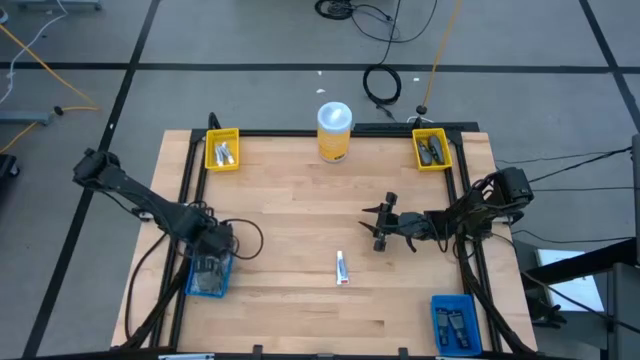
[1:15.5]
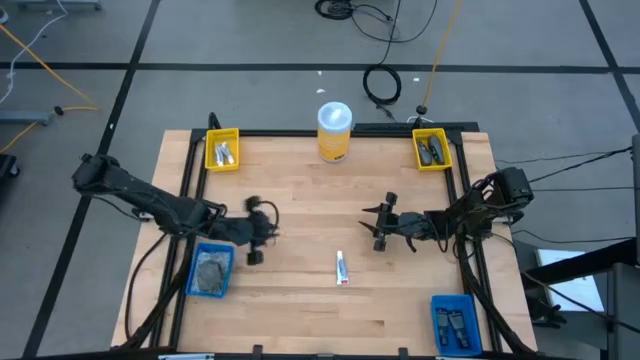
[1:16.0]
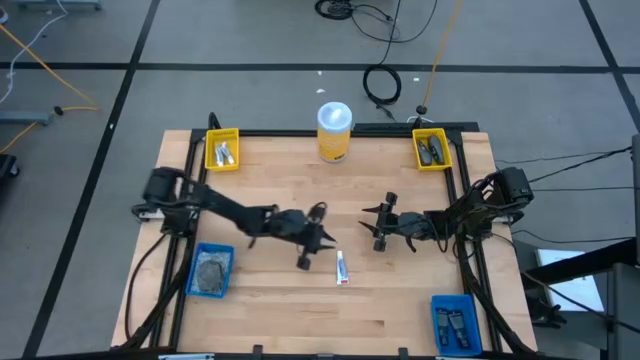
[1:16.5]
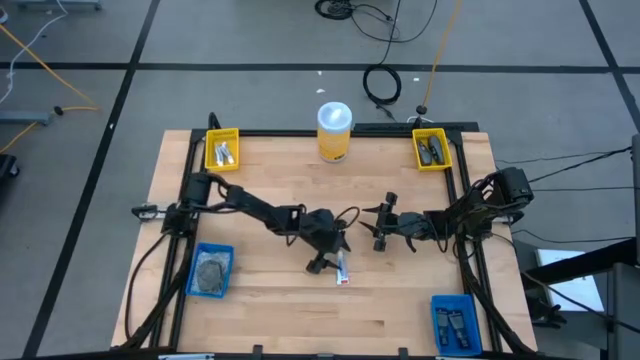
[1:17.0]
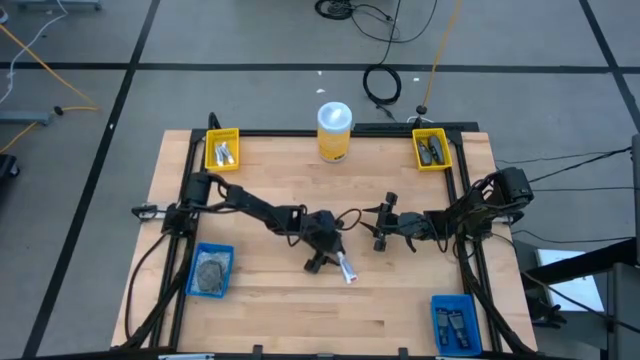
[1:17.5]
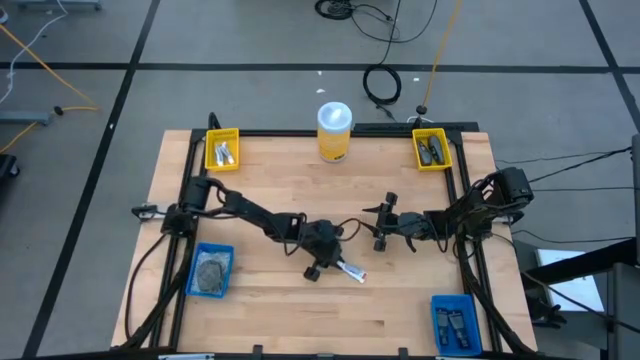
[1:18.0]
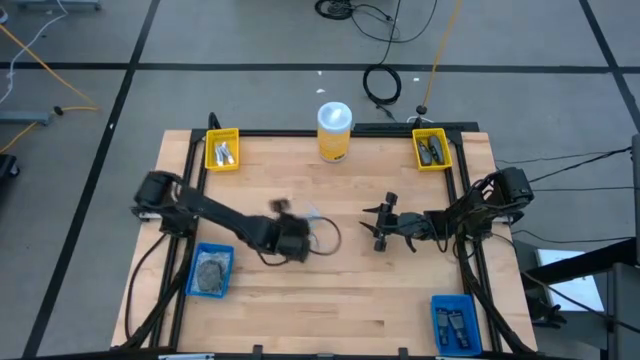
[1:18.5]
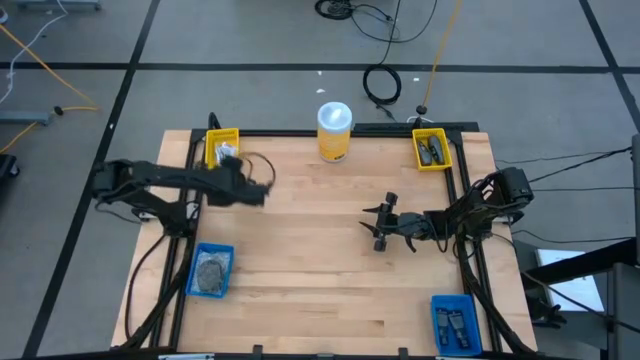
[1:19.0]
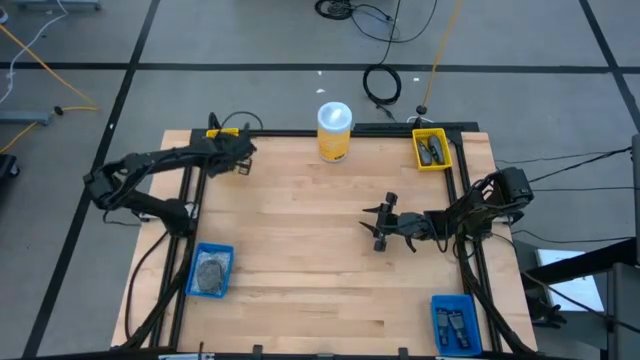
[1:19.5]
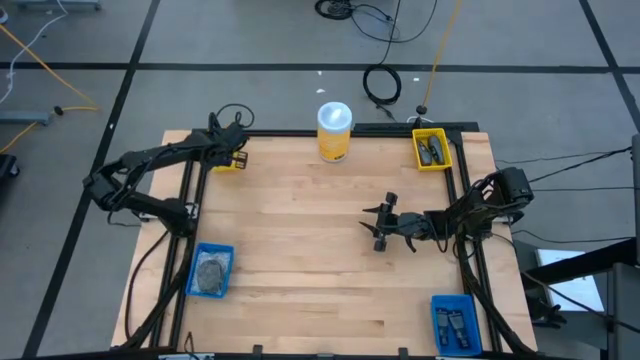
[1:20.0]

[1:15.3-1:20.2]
Task: Pick & Place Travel size toiletries
Put the white toothpaste into the left yellow bin

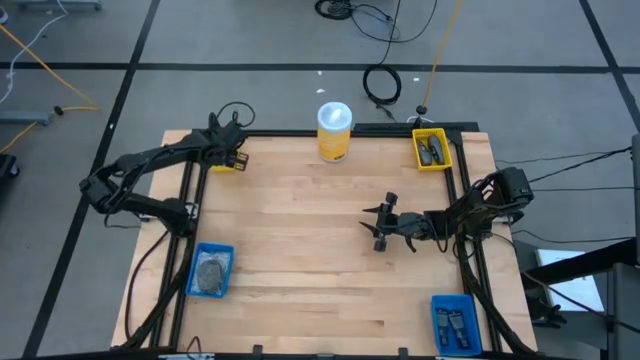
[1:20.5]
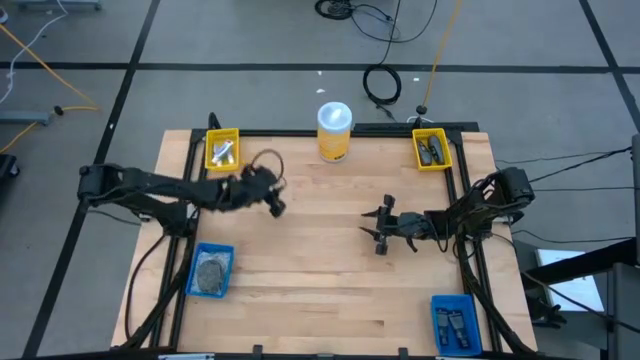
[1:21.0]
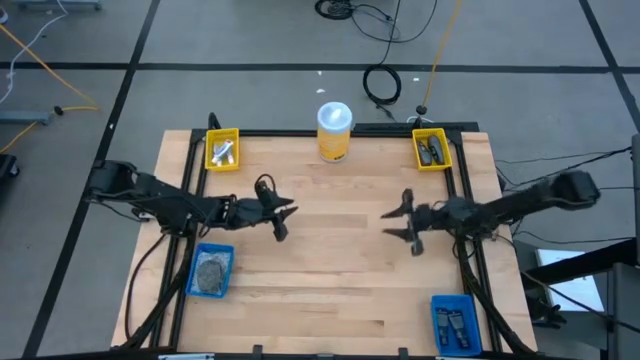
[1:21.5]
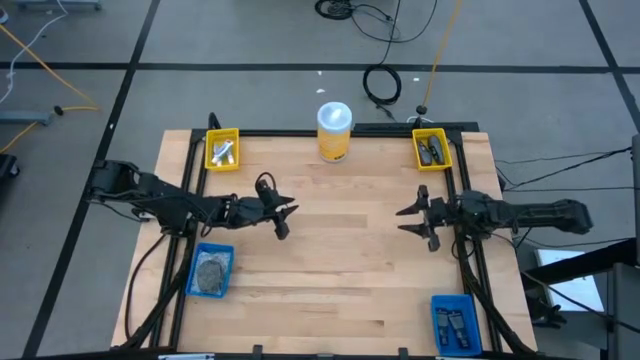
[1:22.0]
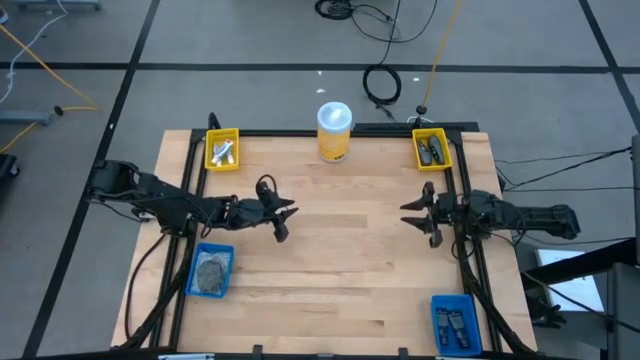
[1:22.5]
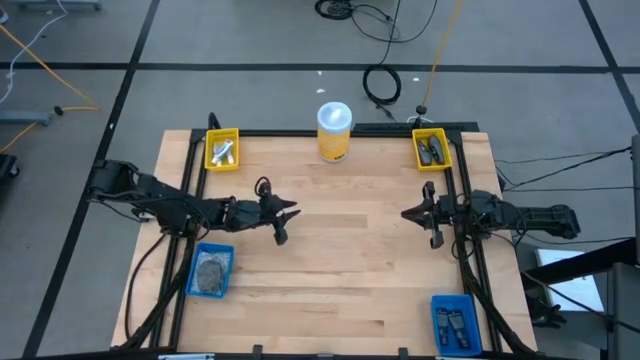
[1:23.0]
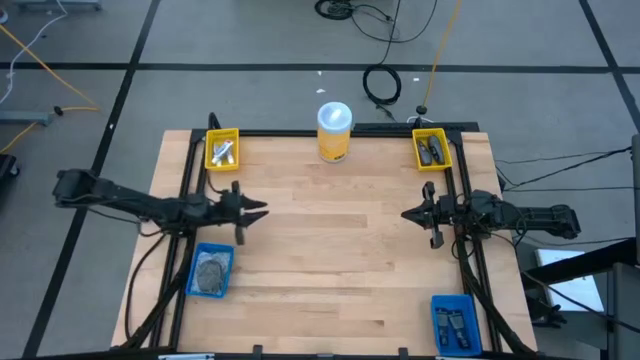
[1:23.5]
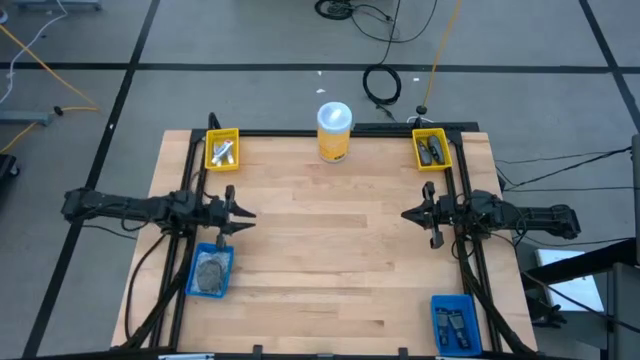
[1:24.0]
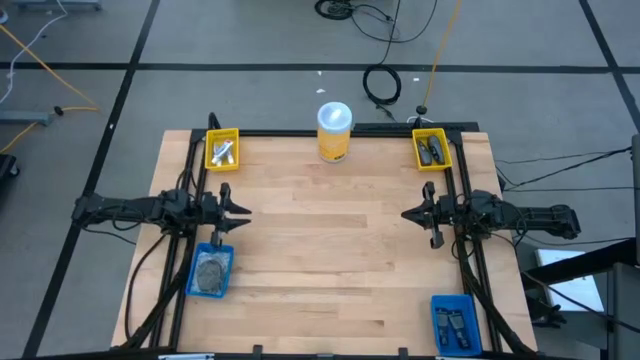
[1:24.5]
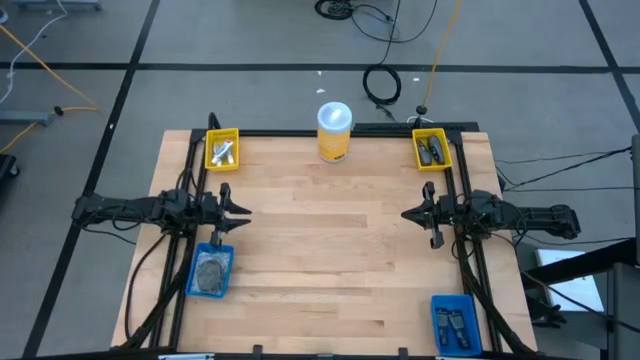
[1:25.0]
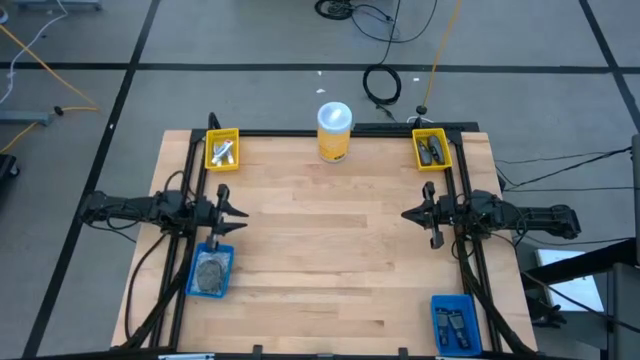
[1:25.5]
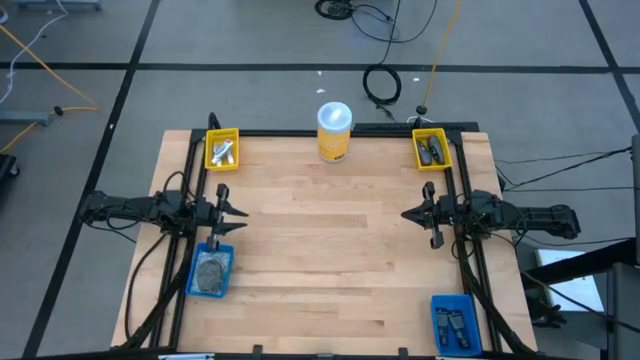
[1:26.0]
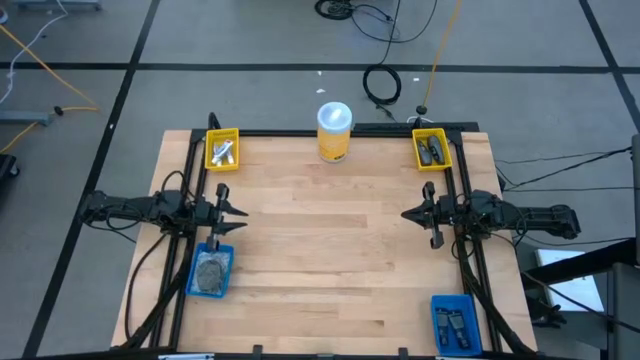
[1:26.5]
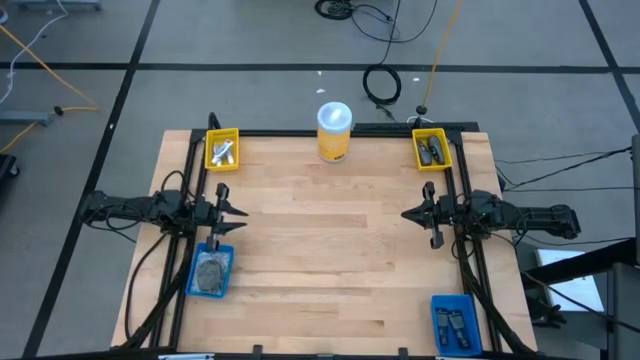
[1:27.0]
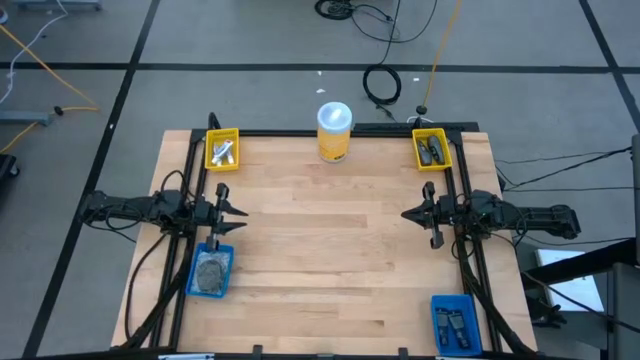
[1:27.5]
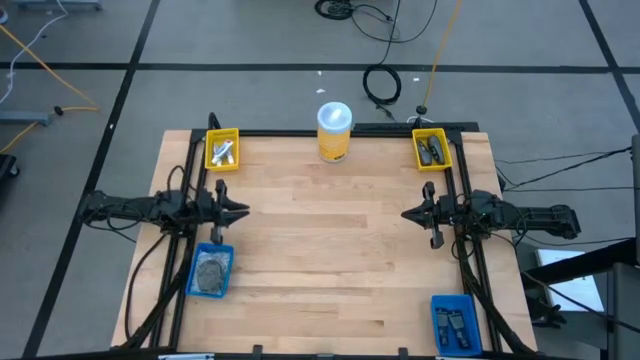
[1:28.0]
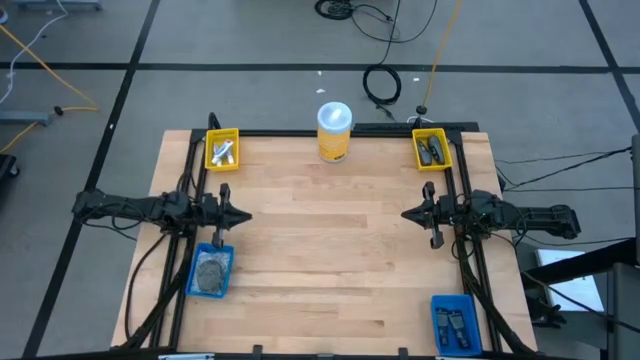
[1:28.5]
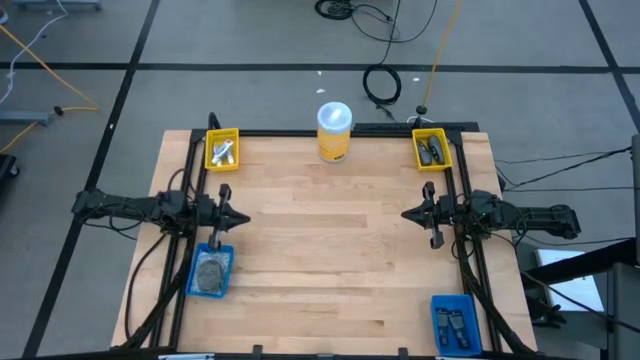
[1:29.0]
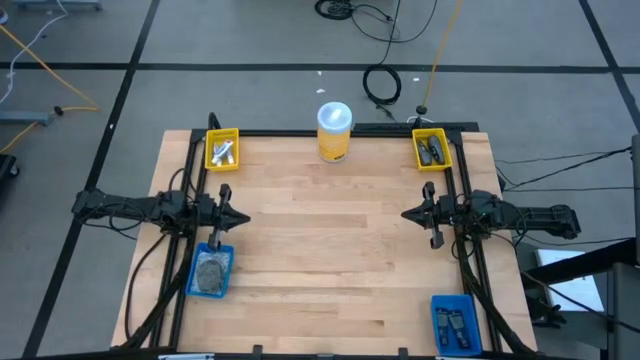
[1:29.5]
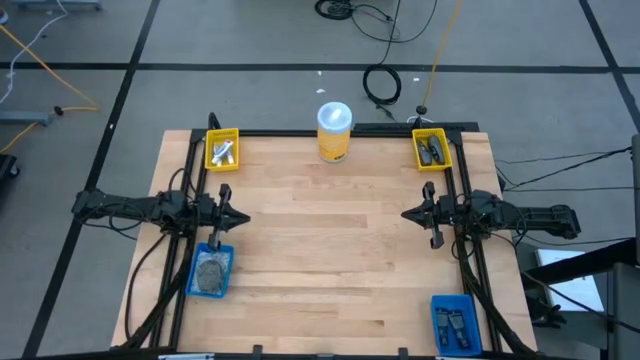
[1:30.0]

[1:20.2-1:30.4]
Return to Home Position

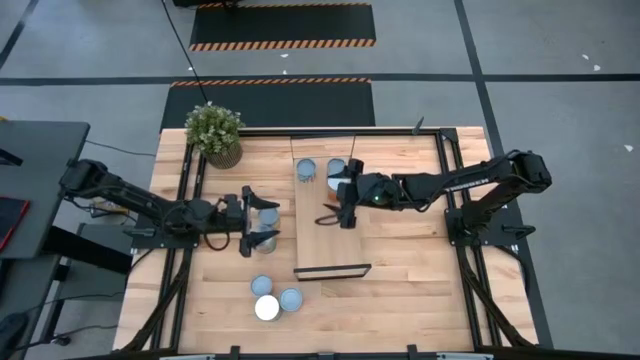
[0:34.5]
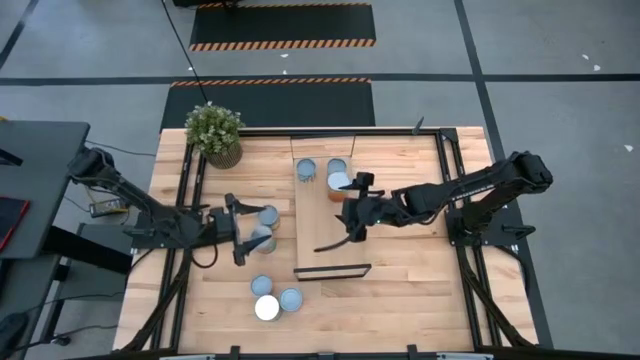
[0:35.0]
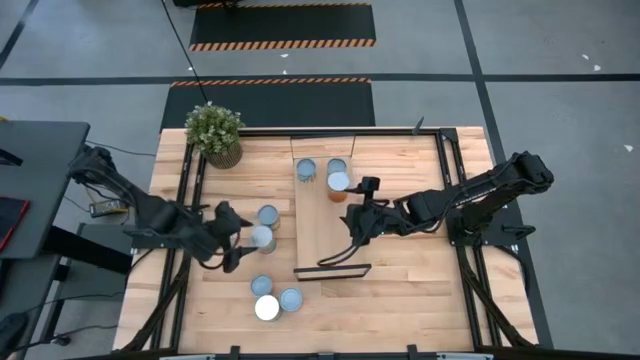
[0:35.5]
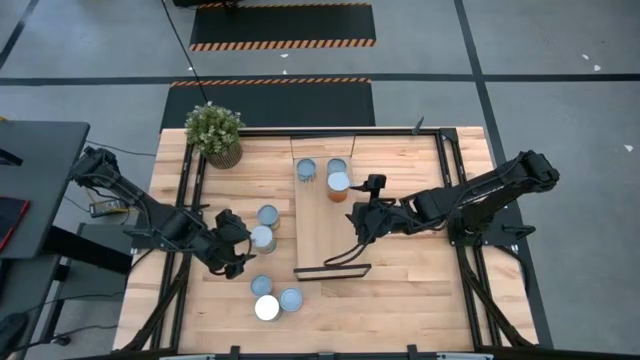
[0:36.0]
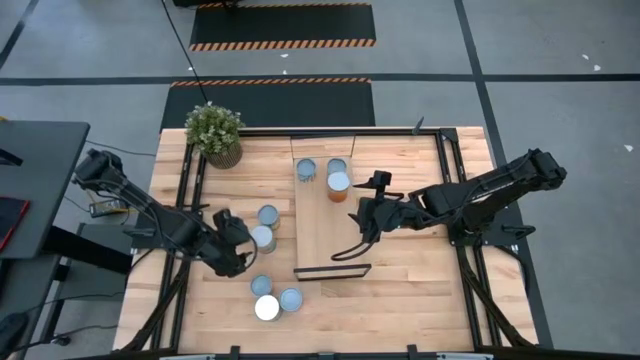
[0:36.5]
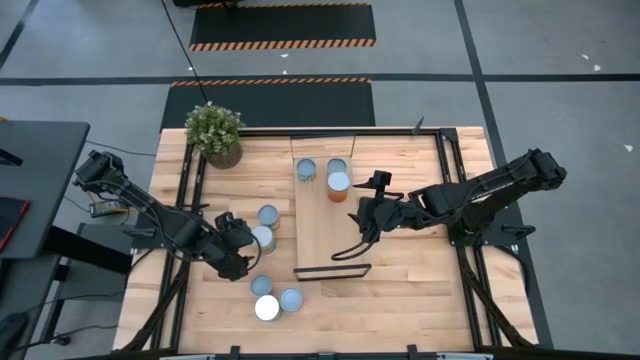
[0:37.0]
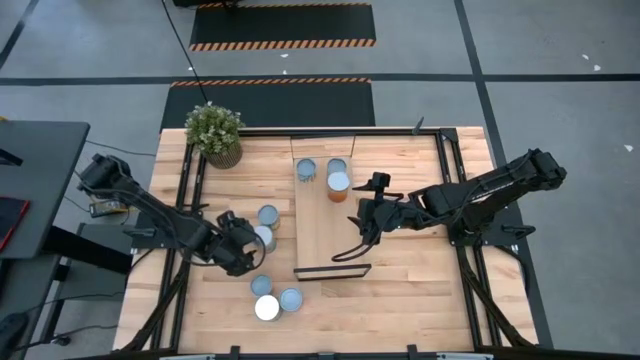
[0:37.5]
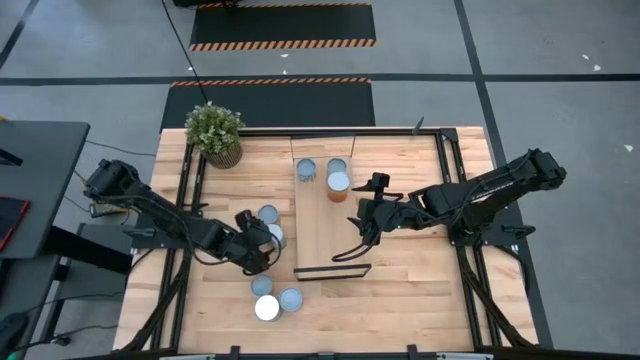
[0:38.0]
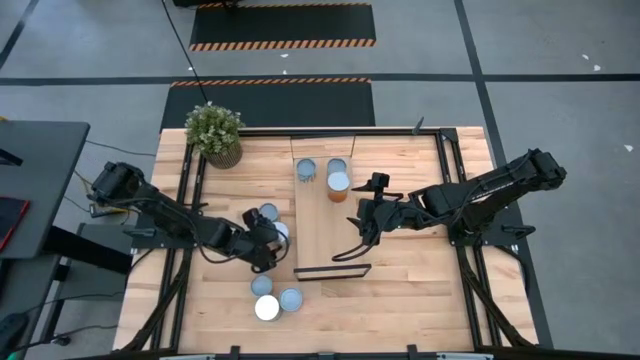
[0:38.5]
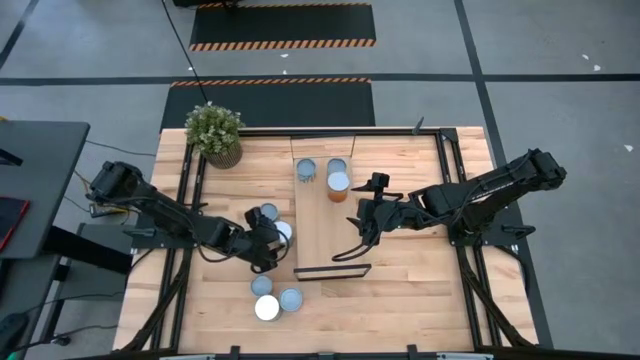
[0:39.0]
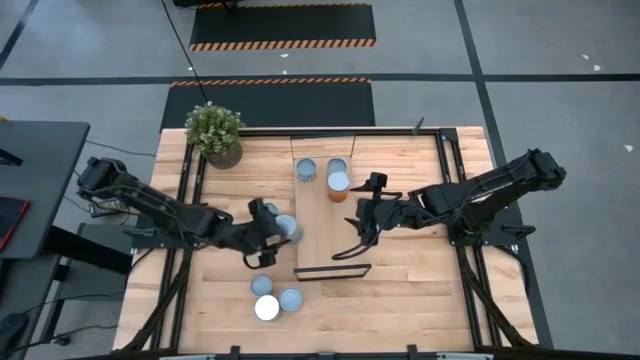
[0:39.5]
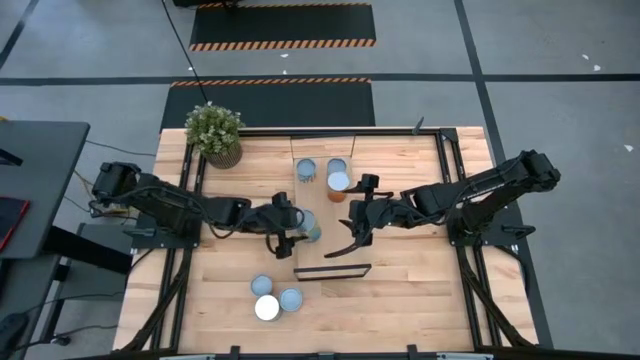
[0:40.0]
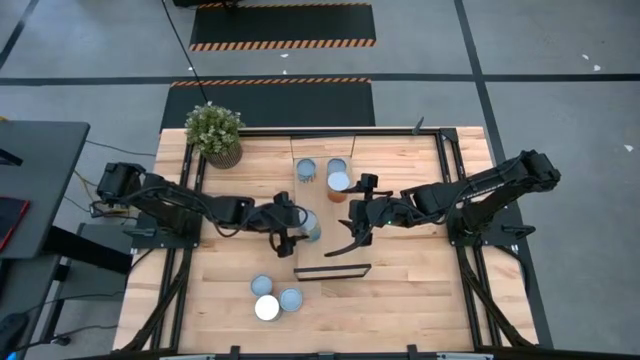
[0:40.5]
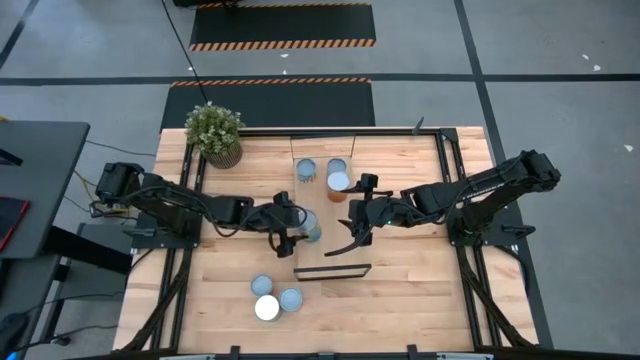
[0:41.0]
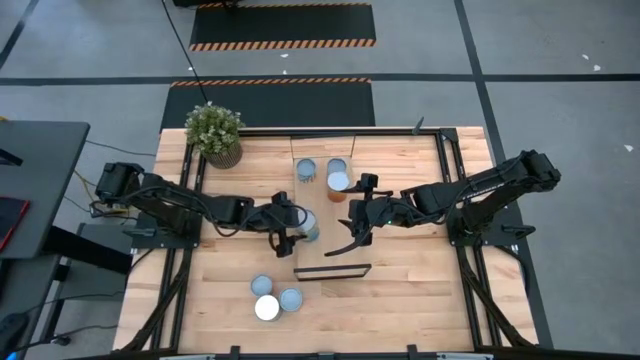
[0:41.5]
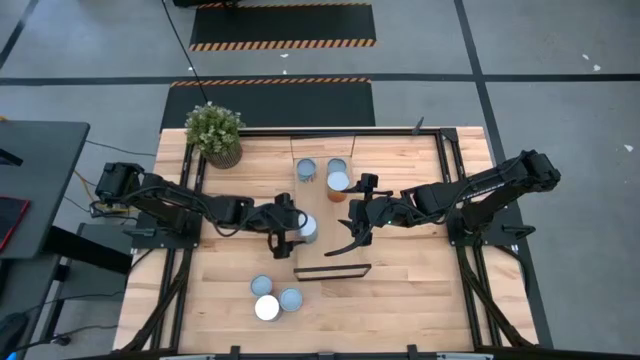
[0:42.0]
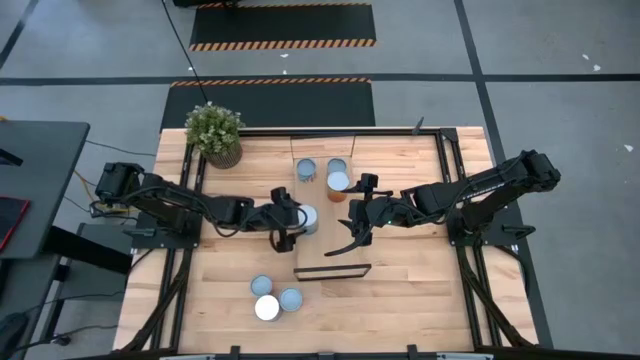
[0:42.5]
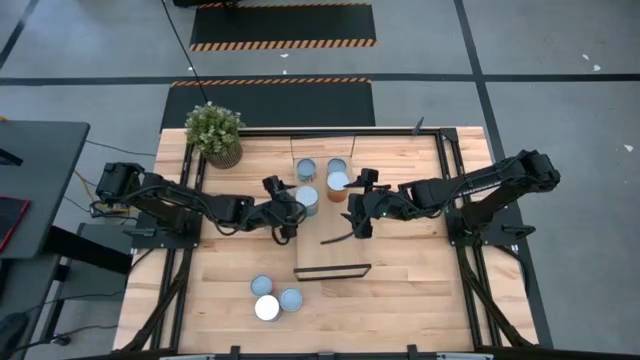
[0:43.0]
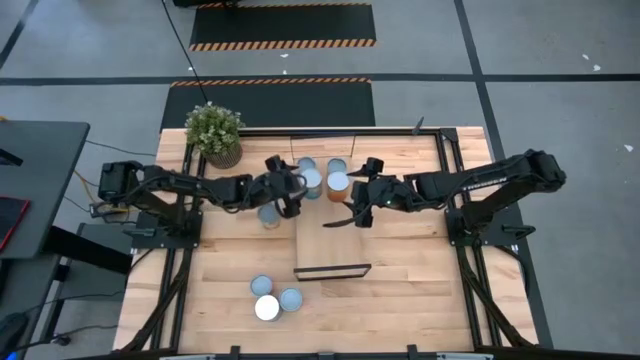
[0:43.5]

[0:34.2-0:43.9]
Task: Pick and place cans onto a shelf
Put the large canned tomatoes on the shelf
